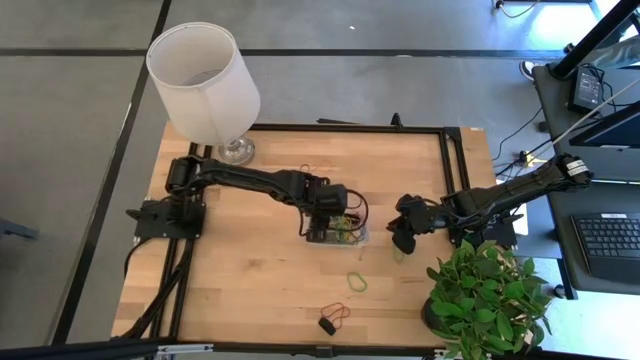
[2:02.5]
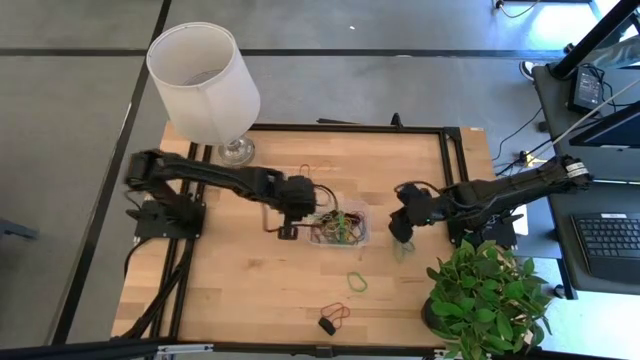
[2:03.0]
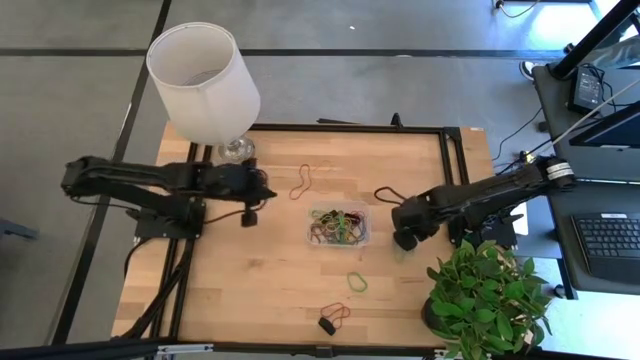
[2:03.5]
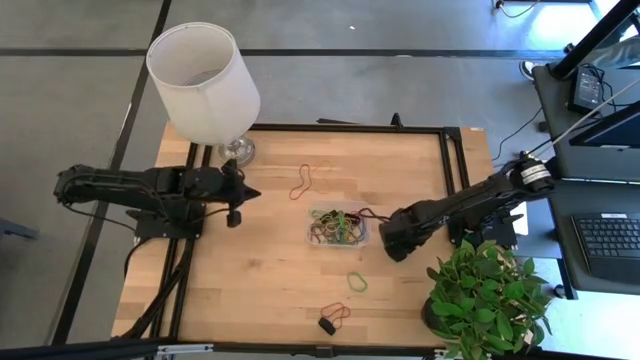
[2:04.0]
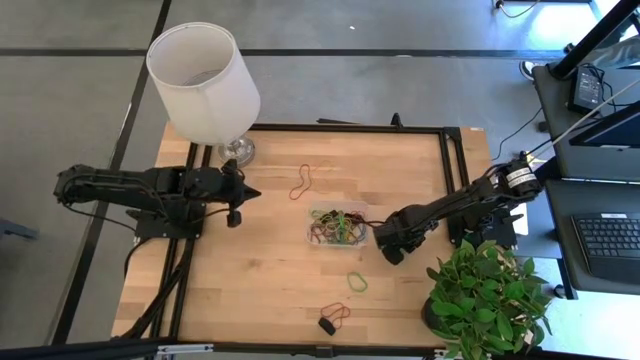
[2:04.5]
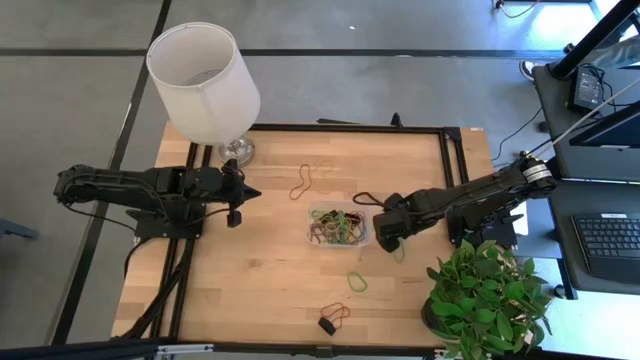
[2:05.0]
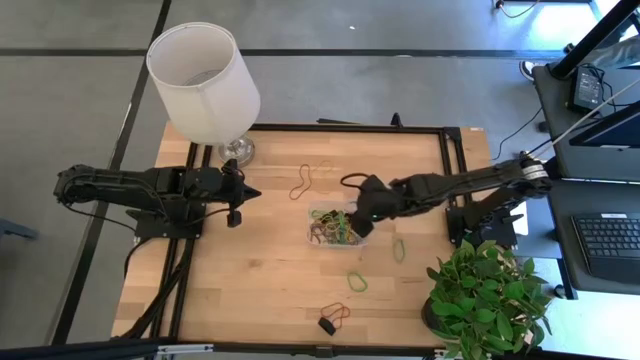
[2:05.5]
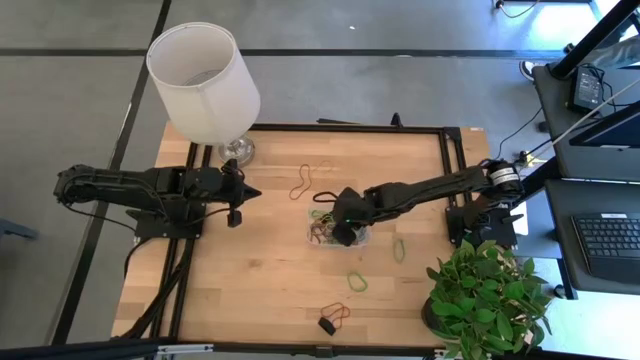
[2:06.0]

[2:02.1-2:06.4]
Task: Pick and place rubber bands into bin
Put the blue rubber band into the transparent bin

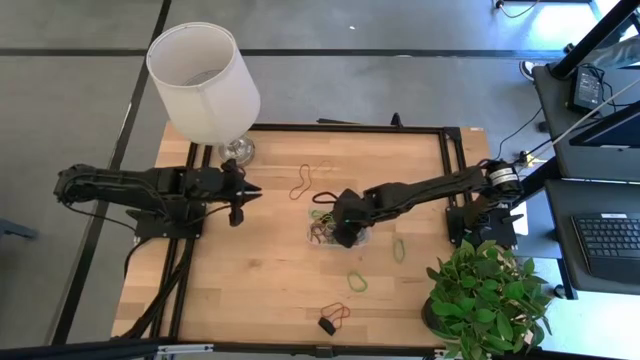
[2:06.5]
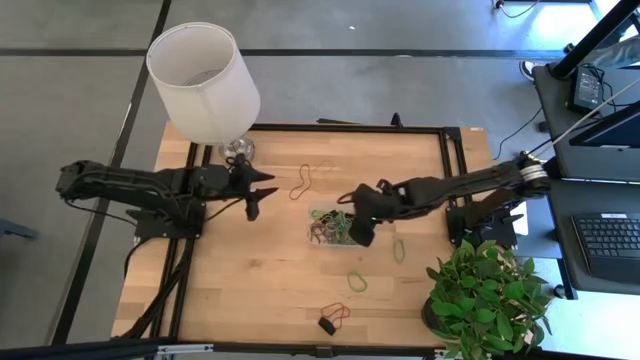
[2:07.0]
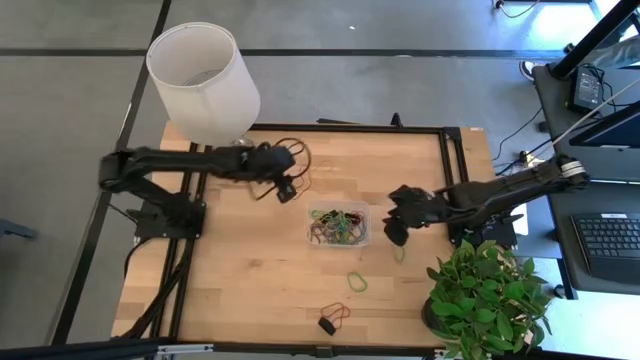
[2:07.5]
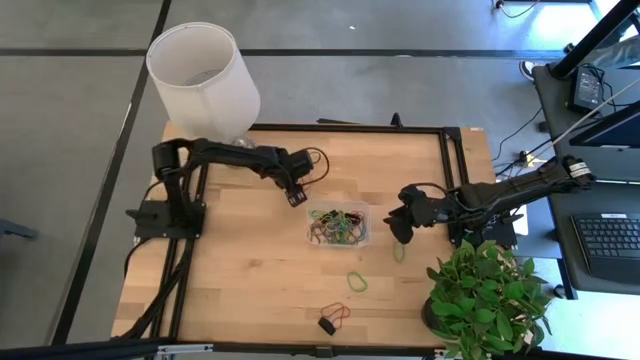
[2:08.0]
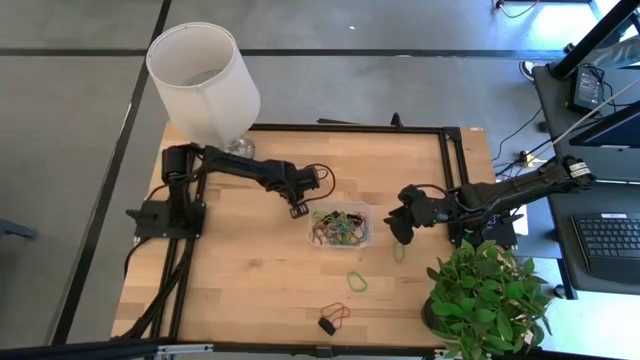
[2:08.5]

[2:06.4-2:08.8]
Put the red rubber band into the transparent bin

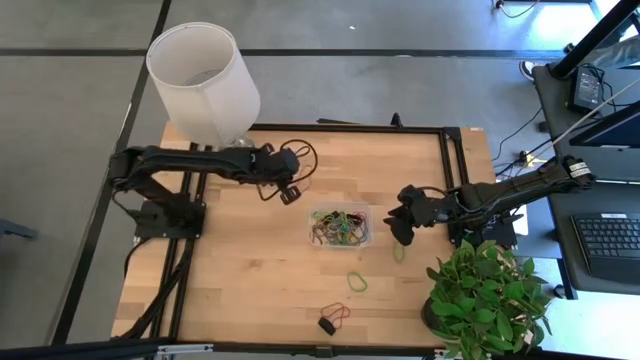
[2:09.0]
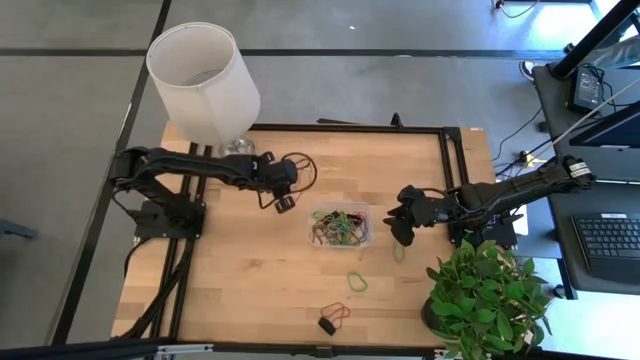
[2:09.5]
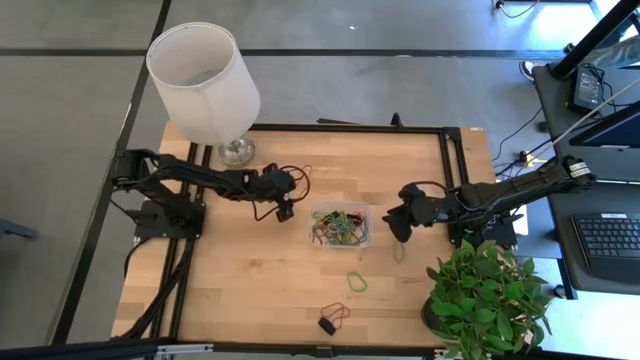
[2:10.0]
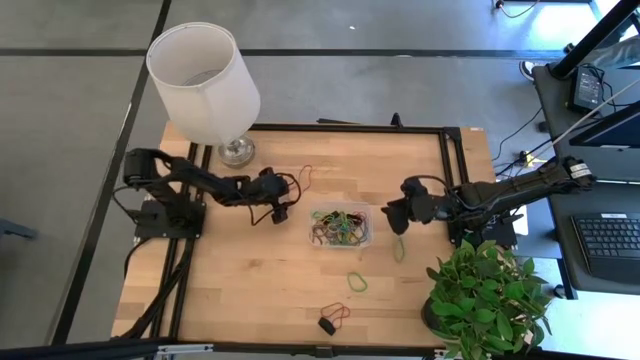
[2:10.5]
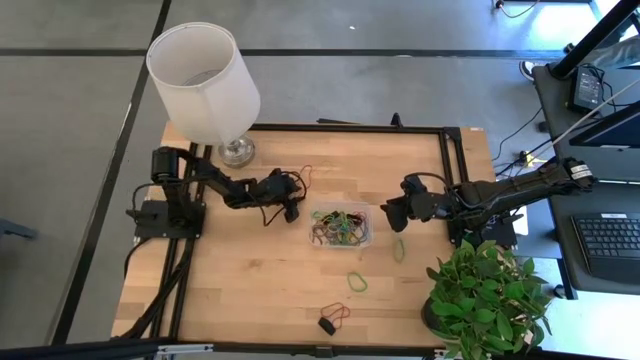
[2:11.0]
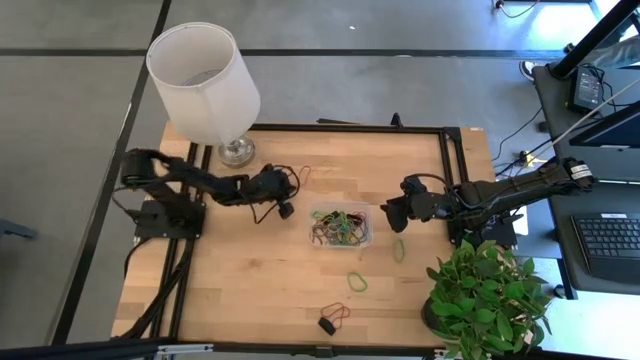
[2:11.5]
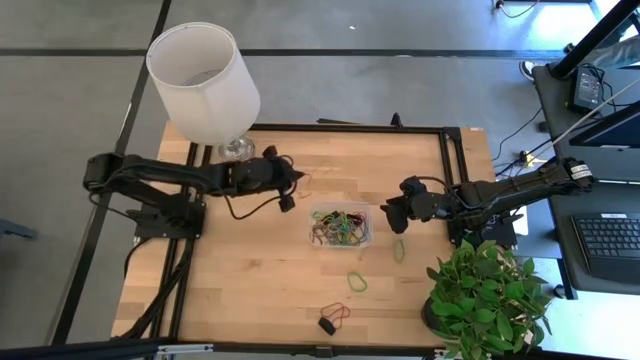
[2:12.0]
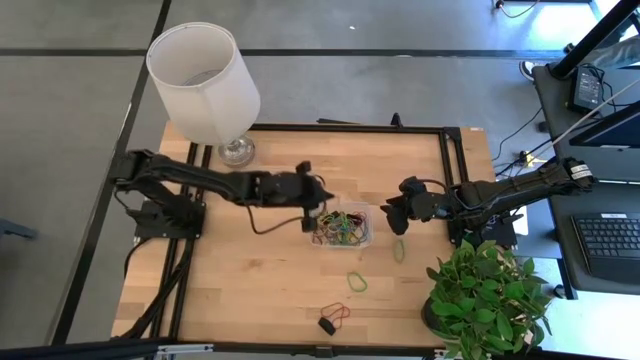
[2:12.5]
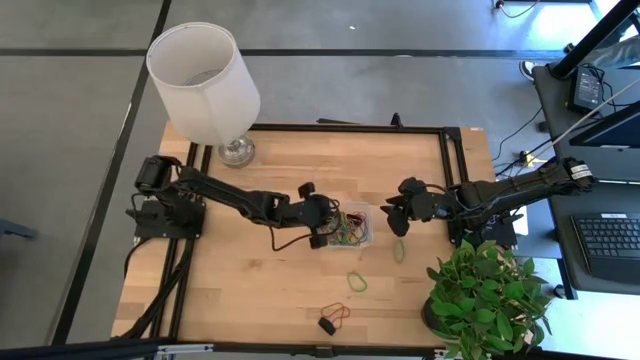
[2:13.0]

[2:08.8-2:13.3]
Put the red rubber band into the transparent bin

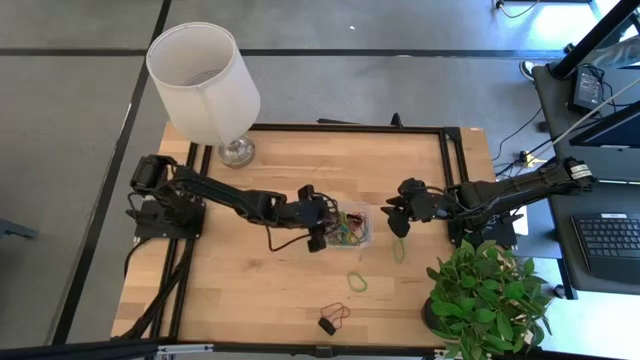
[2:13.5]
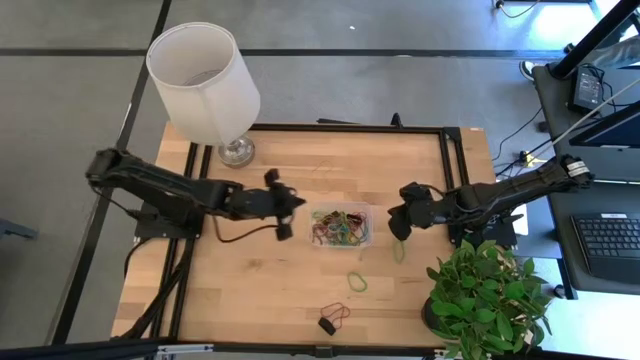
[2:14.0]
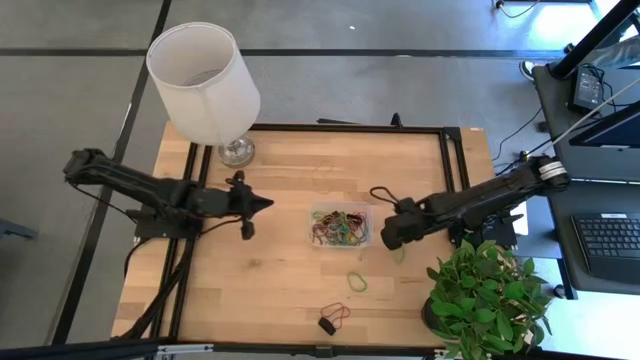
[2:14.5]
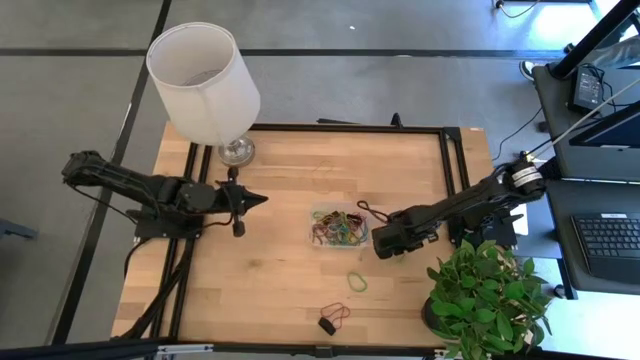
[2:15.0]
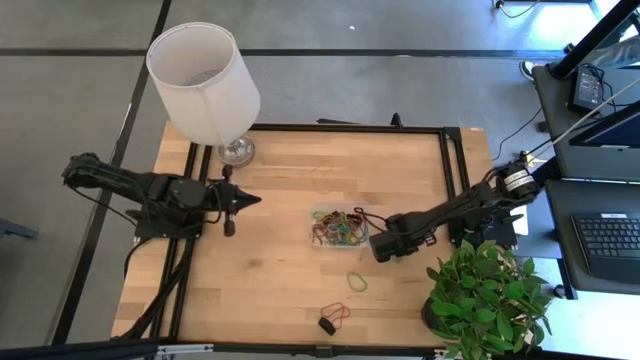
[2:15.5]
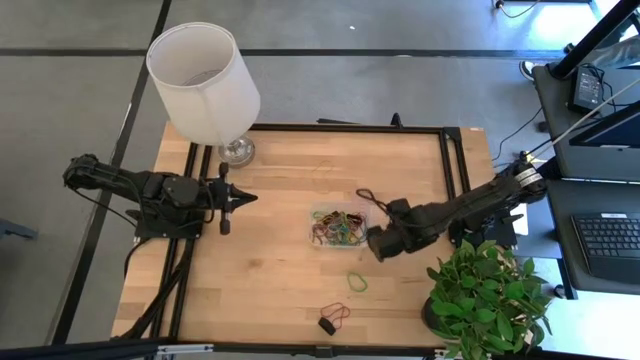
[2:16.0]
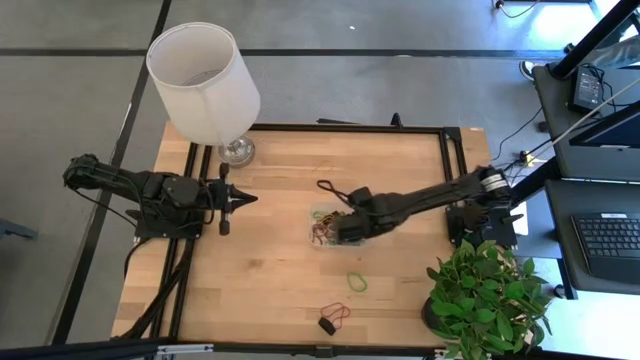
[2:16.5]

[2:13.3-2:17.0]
Put the green rubber band into the transparent bin

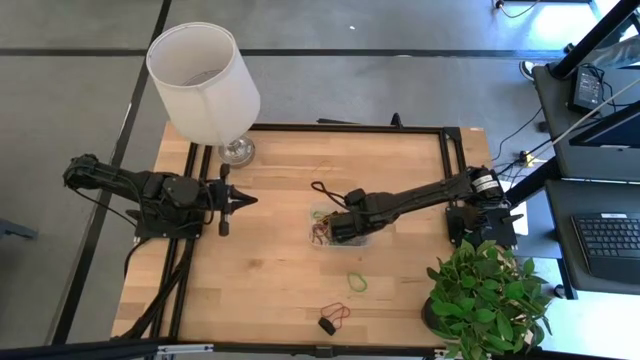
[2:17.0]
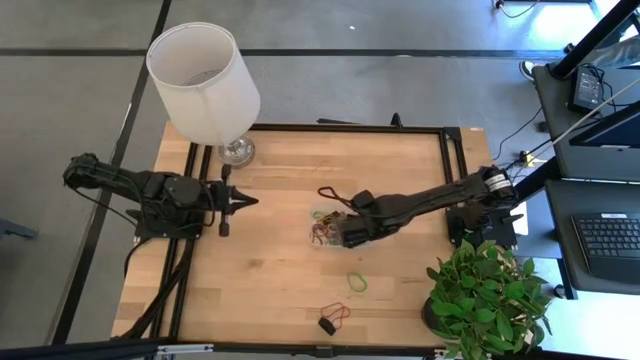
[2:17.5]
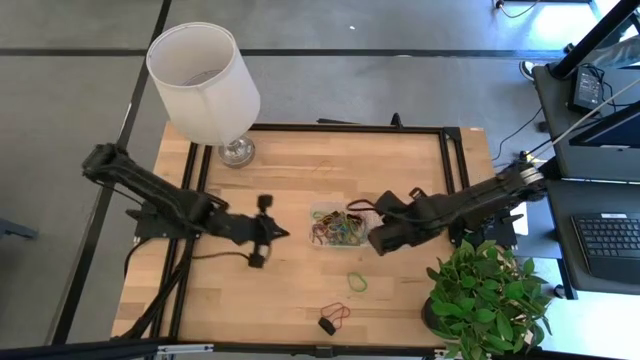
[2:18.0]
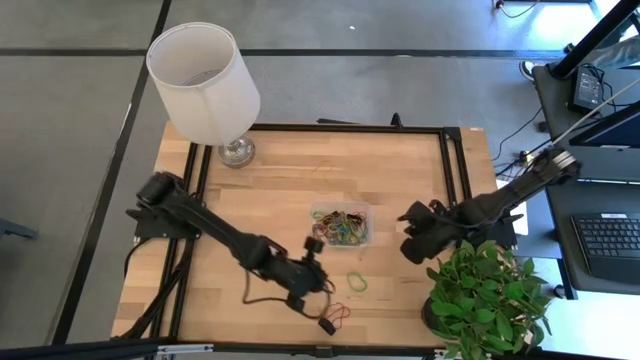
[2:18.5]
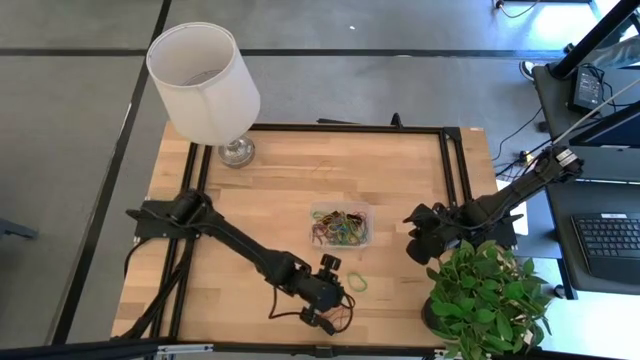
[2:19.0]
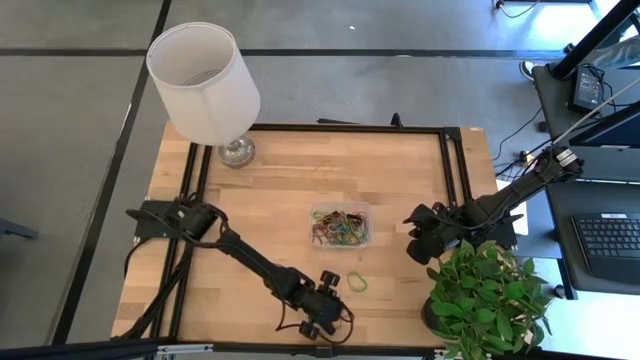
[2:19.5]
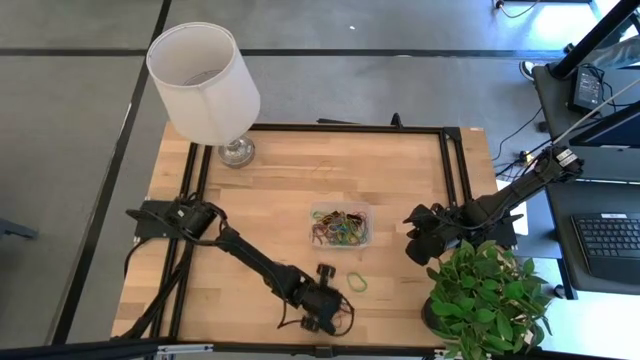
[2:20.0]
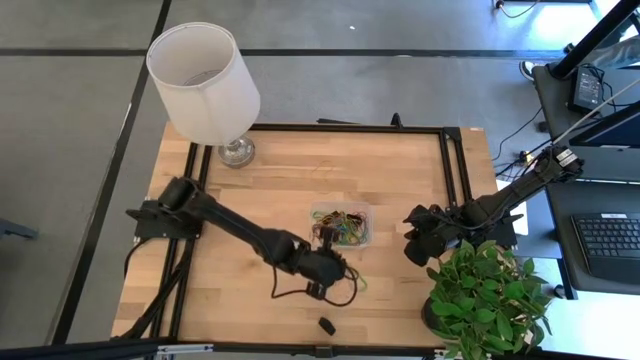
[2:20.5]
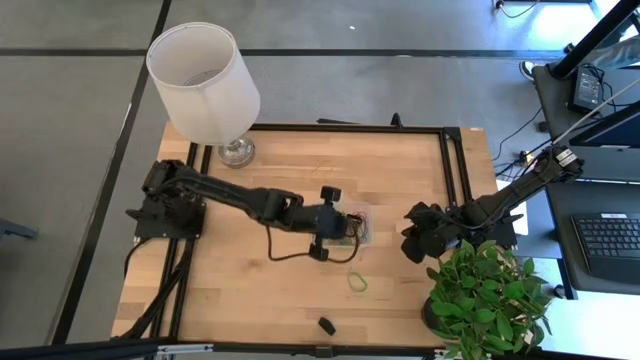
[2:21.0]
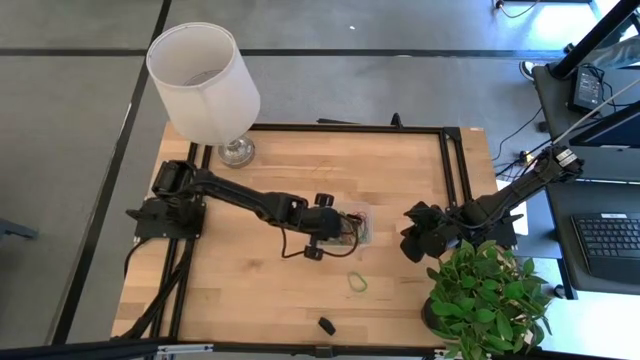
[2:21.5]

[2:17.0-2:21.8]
Put the red rubber band into the transparent bin
